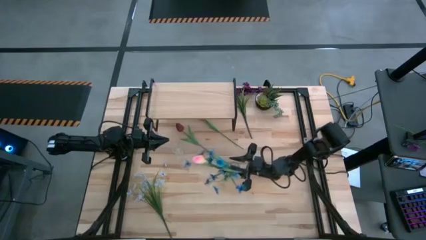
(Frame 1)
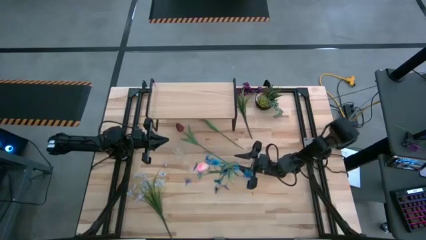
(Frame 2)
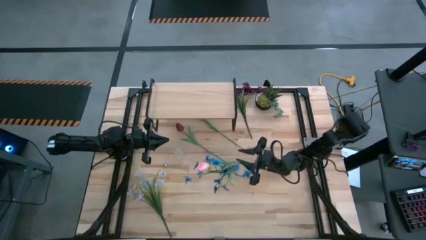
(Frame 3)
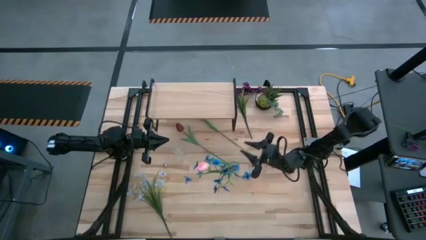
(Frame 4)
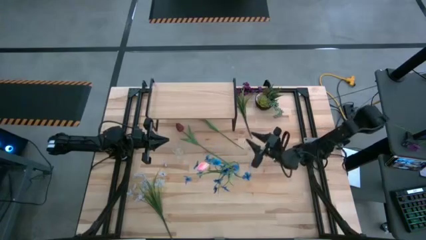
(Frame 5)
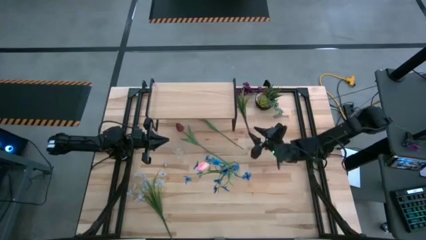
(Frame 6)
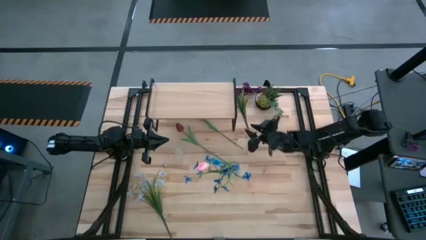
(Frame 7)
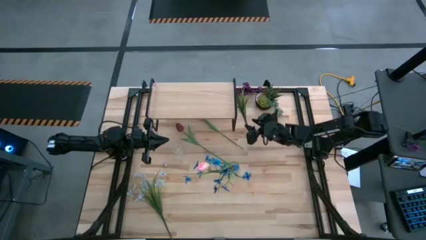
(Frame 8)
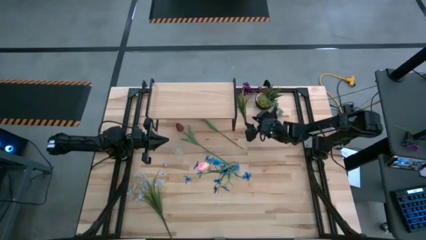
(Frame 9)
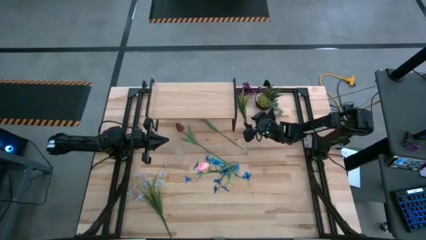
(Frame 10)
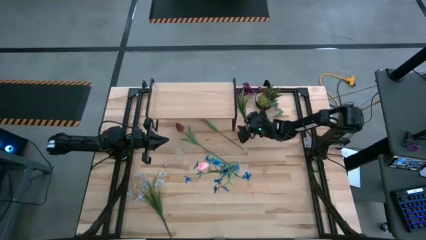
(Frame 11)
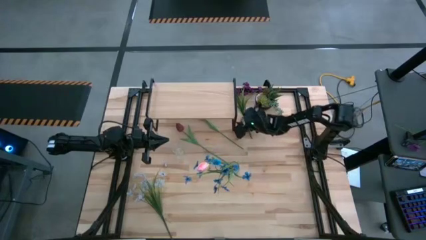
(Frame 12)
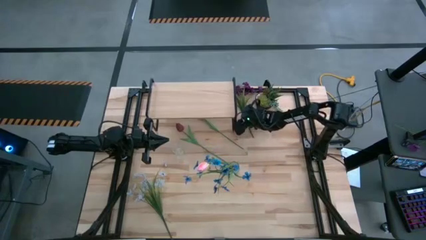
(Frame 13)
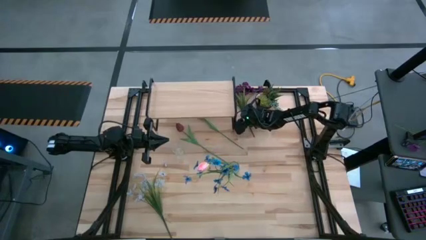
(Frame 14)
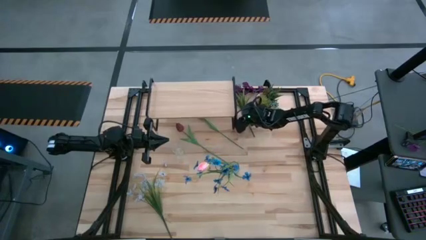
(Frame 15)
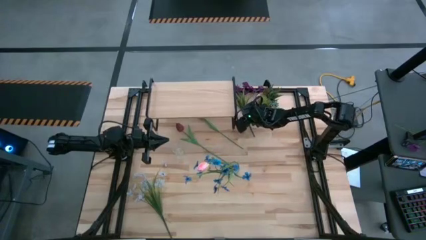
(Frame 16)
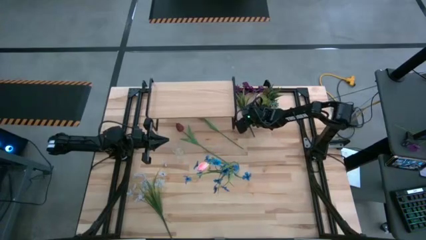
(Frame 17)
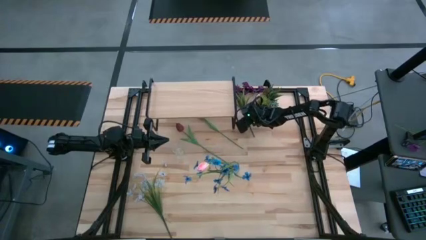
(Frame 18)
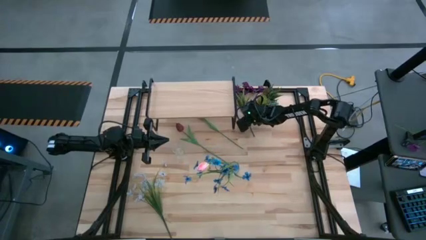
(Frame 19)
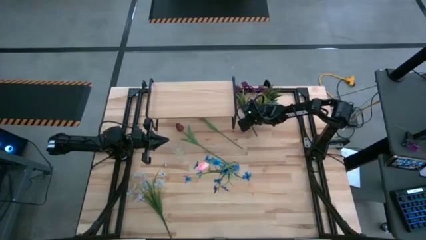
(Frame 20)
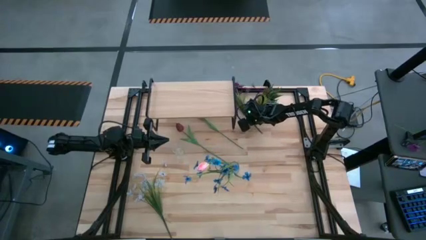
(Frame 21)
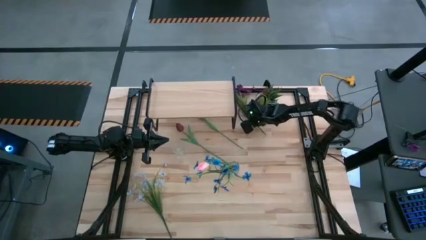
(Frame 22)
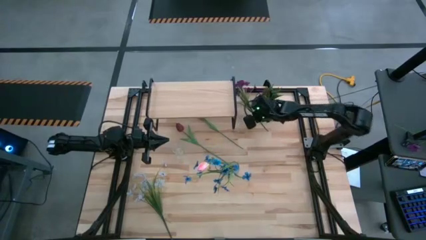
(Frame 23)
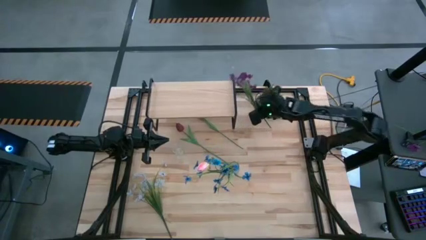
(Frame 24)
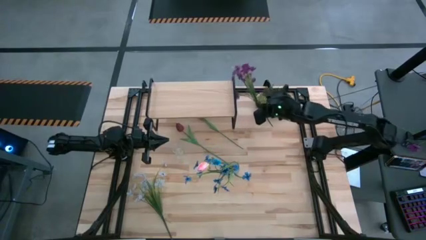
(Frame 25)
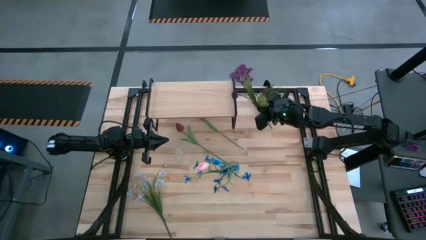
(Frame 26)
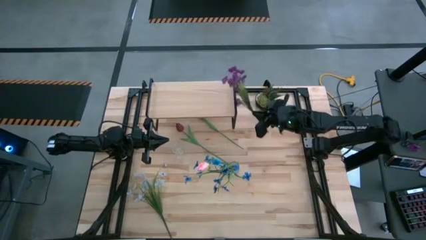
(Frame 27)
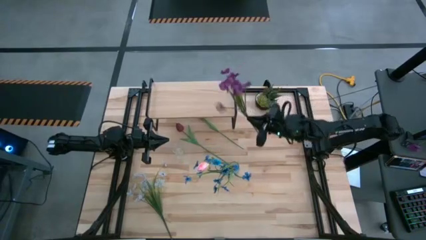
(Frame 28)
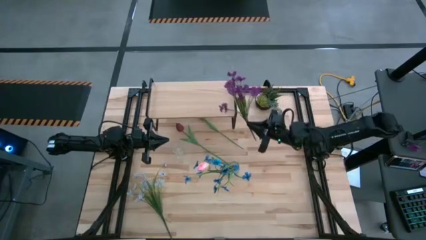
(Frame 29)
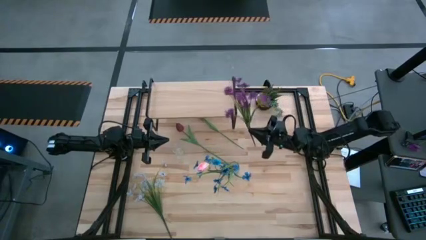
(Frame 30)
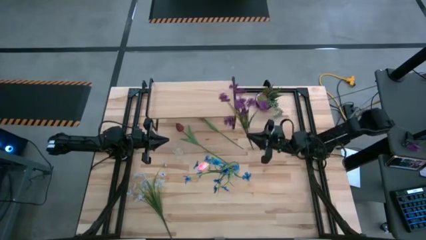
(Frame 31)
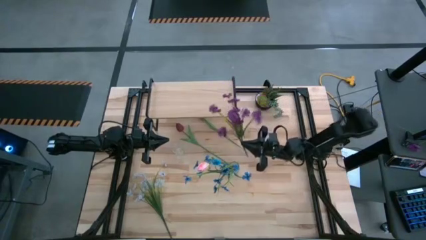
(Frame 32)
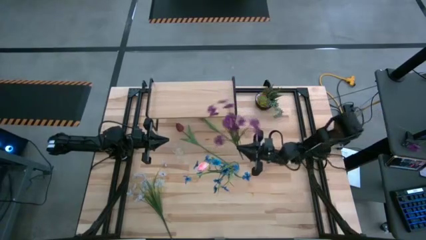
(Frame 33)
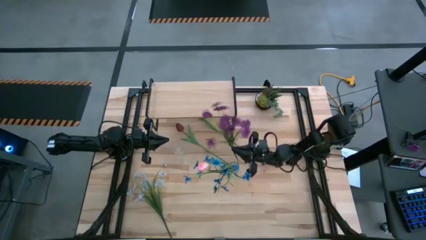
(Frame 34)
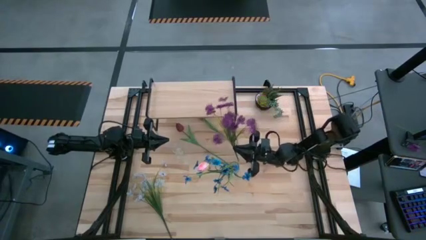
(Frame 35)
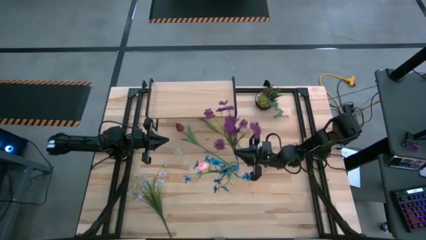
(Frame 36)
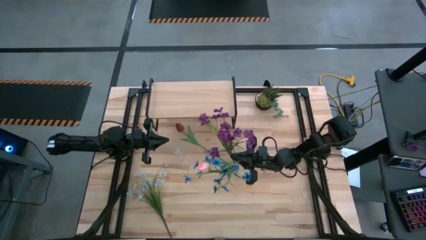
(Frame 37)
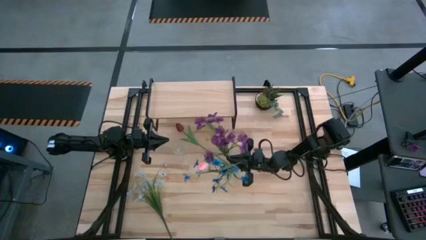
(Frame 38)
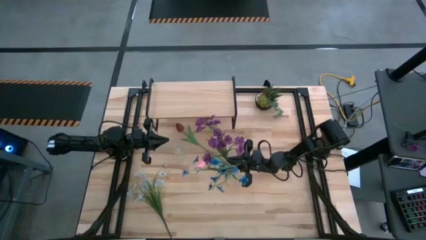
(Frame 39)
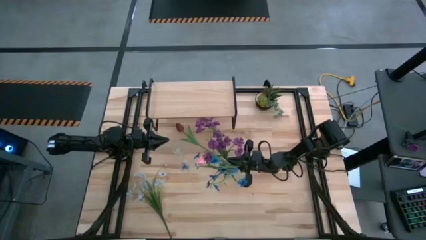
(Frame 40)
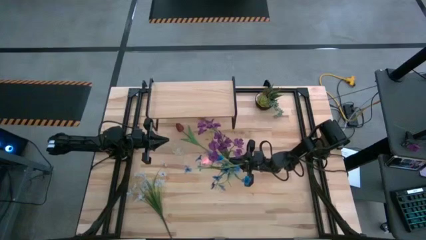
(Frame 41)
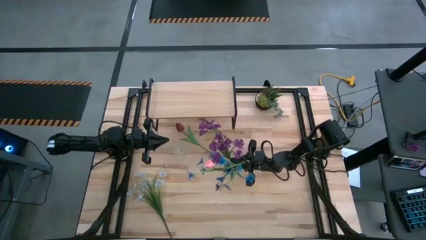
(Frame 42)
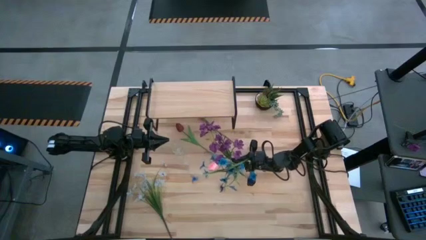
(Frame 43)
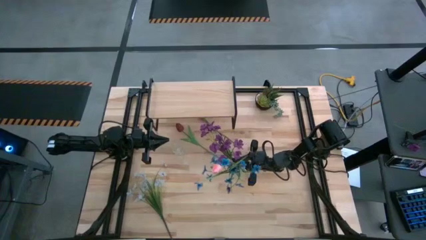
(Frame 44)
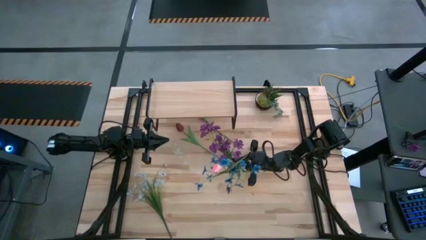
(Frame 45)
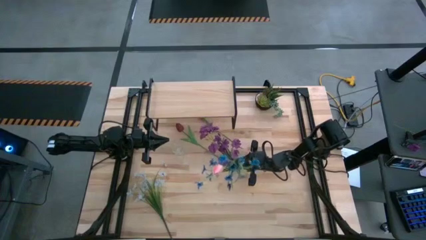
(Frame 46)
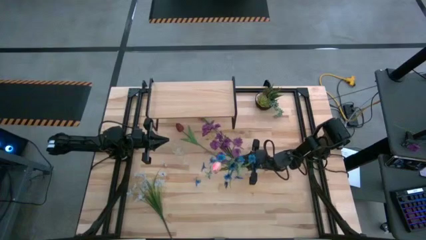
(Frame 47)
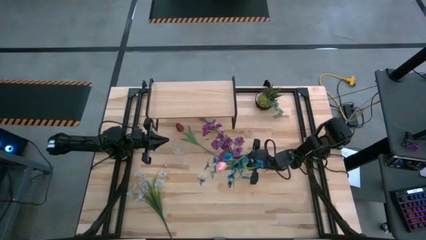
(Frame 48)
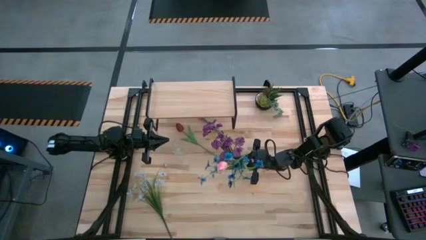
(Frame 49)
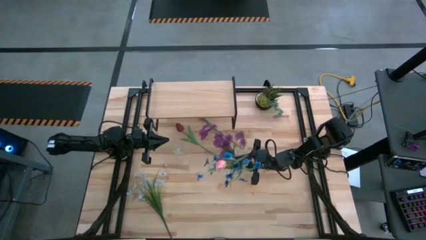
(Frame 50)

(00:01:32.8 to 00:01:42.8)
Task: Pick and place flowers into a vace then onto a shelf
Put the purple flowers into the right transparent vase

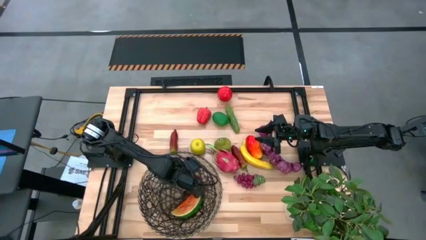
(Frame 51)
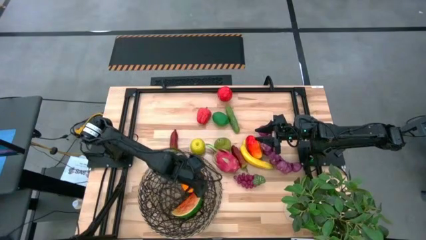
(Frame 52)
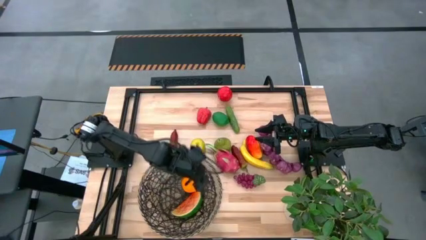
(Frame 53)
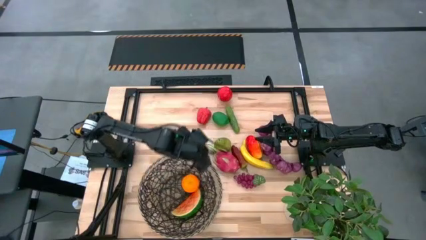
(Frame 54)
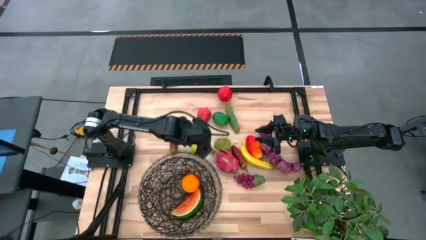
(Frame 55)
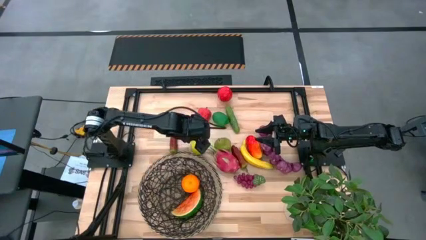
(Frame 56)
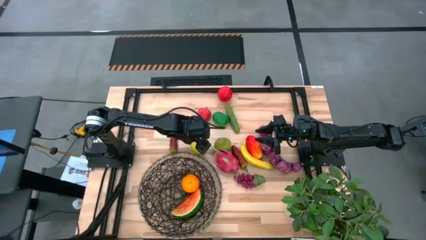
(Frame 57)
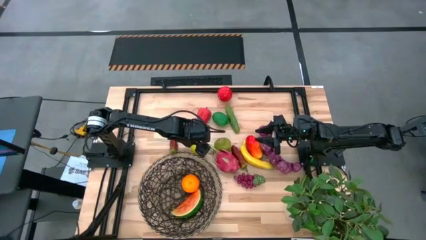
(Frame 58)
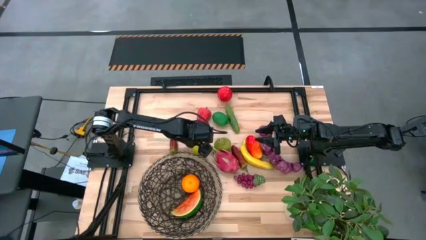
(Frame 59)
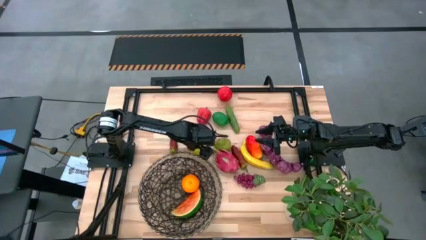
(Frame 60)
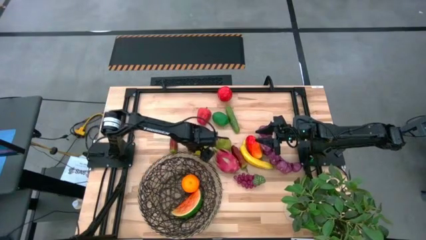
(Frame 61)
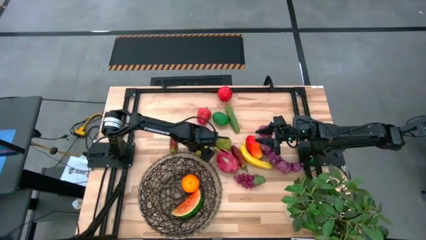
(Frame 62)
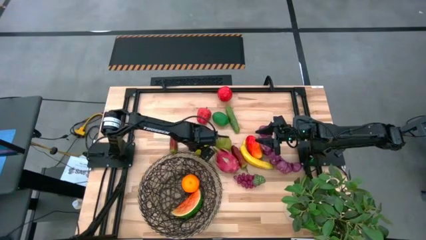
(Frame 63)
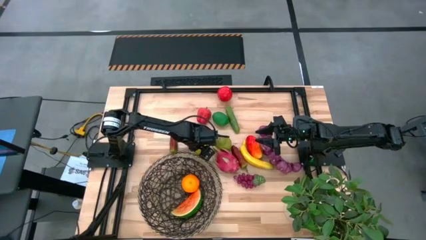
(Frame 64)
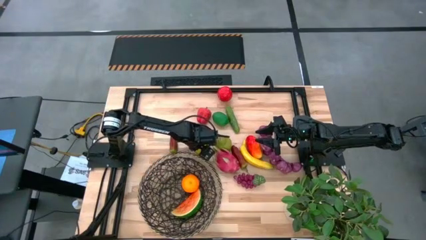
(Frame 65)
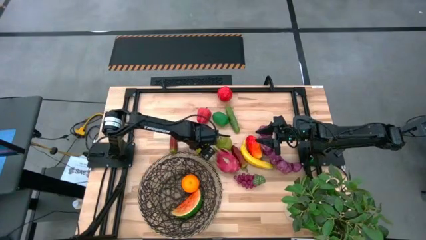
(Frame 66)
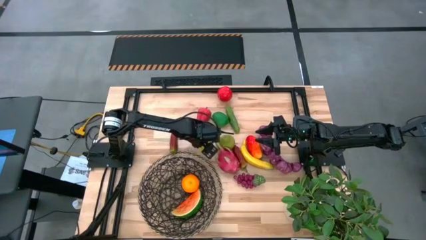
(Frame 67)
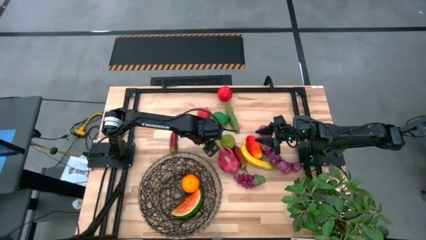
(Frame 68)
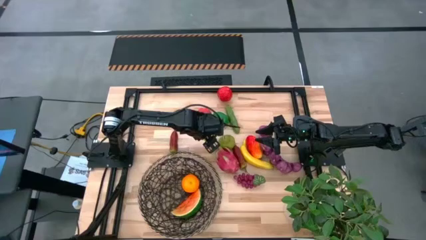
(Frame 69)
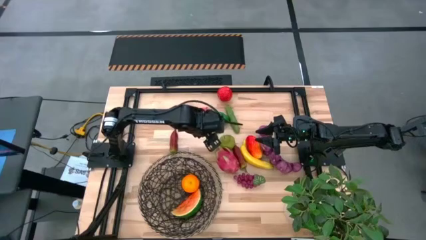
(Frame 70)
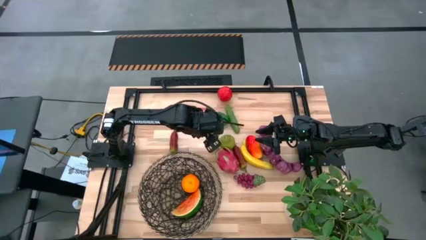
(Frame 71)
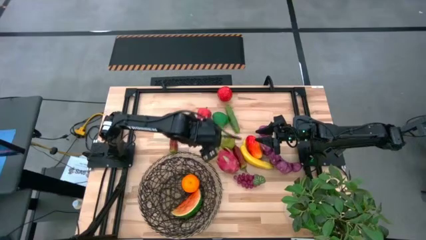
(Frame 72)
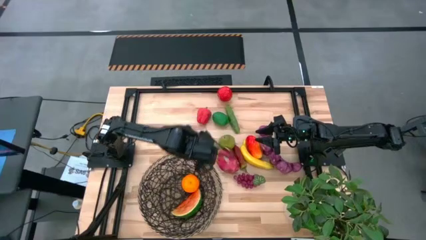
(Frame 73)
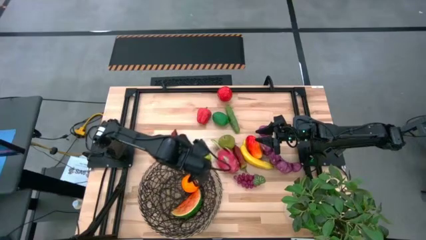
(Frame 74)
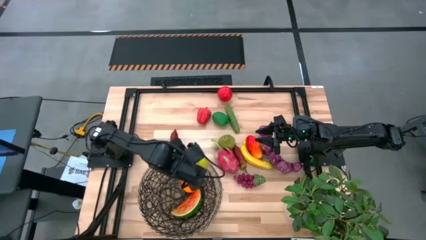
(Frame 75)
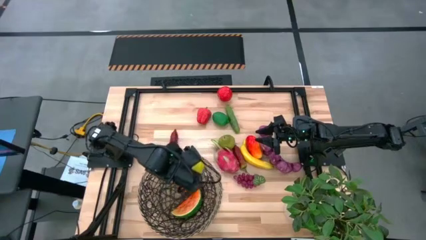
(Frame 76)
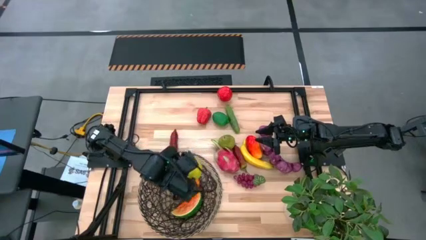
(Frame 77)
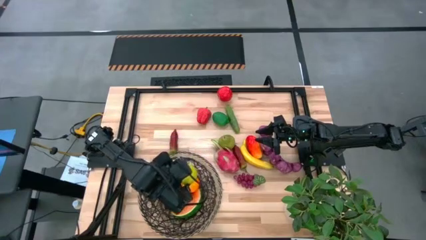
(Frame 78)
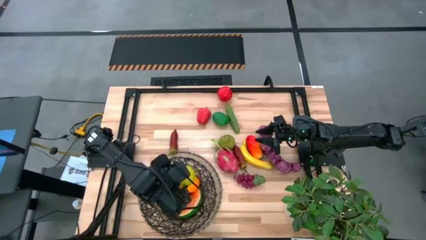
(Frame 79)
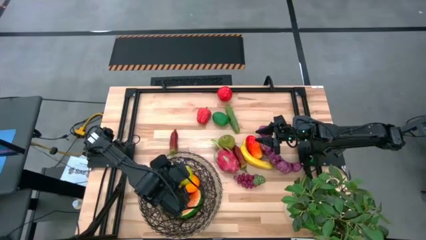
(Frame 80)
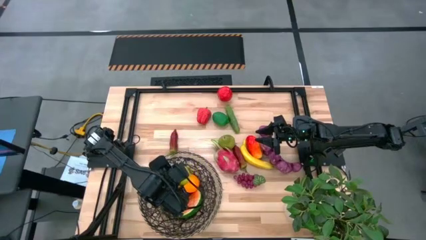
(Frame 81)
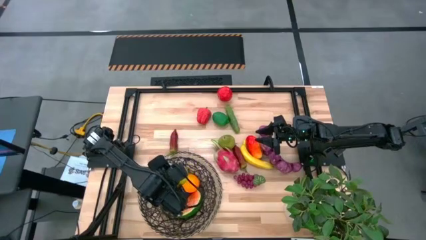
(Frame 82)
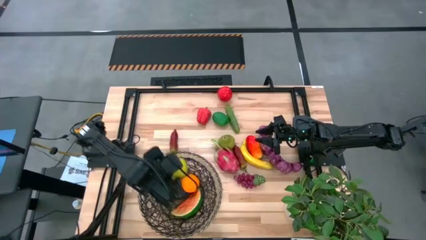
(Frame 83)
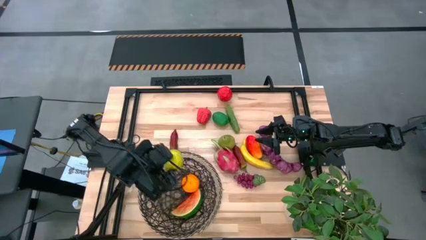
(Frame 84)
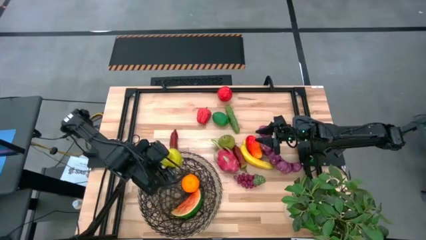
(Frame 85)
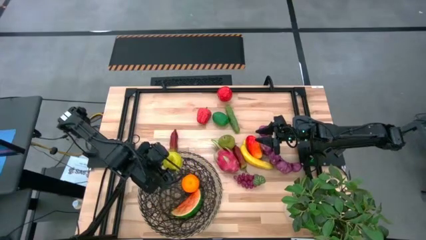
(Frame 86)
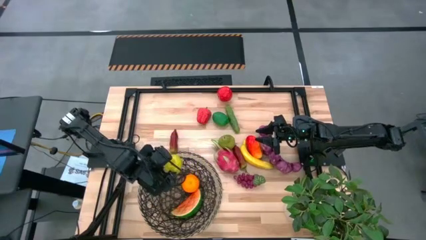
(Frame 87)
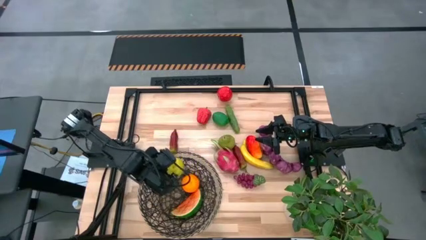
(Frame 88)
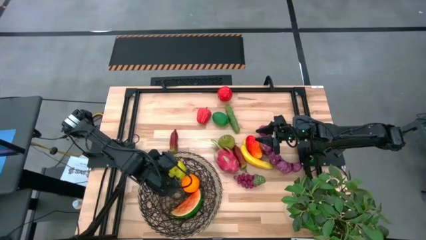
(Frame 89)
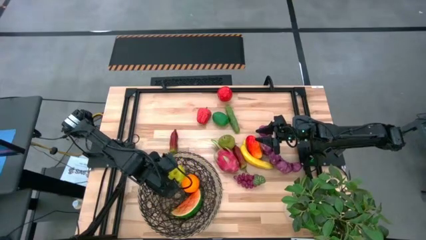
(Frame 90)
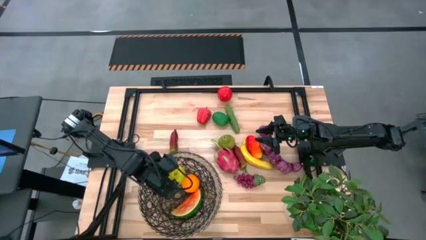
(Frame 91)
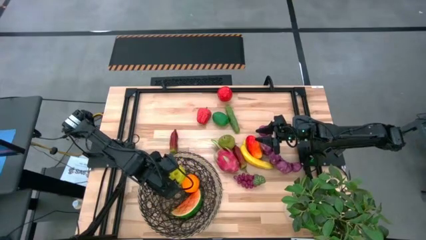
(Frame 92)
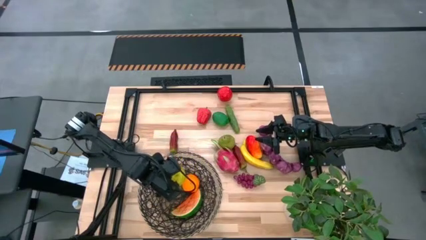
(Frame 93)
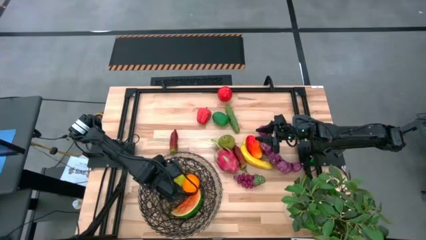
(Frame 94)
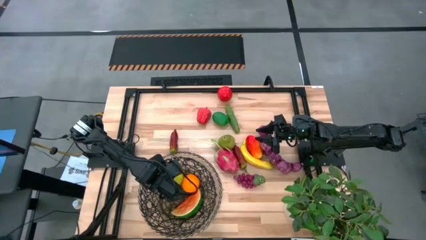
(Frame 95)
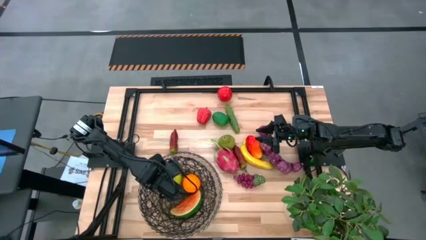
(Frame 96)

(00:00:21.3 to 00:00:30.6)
Task: Build produce basket
Put the green apple into the woven basket
